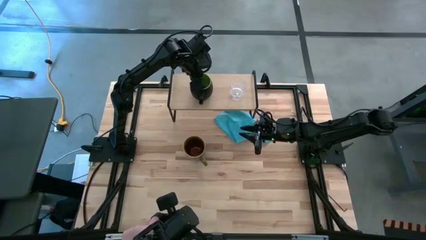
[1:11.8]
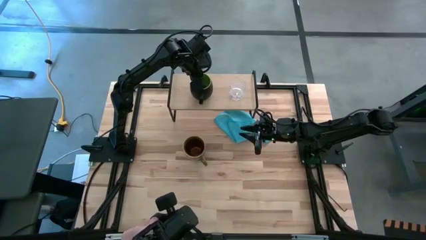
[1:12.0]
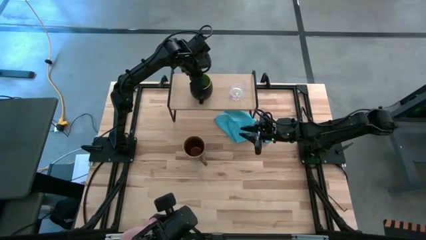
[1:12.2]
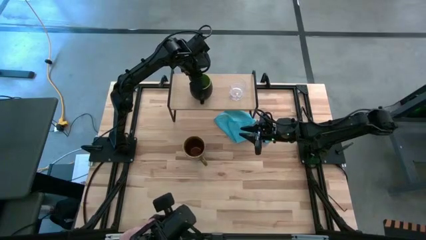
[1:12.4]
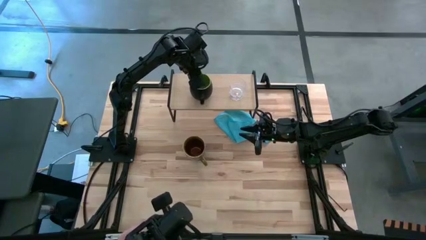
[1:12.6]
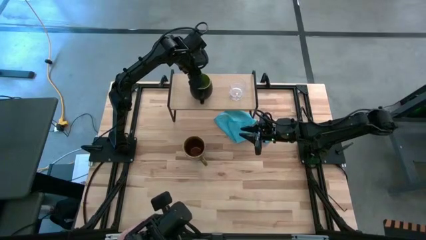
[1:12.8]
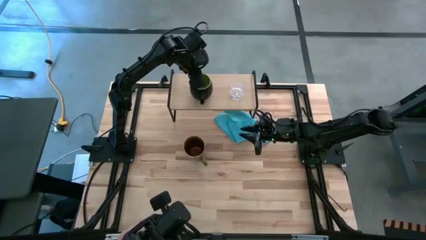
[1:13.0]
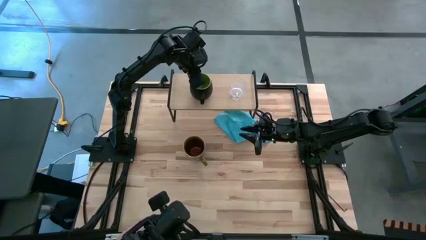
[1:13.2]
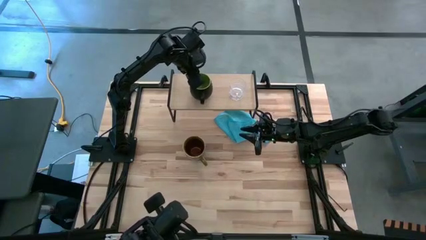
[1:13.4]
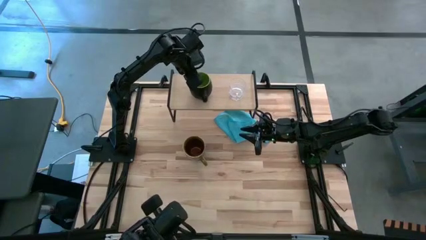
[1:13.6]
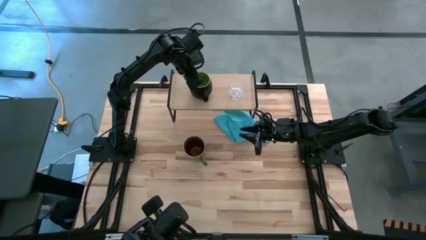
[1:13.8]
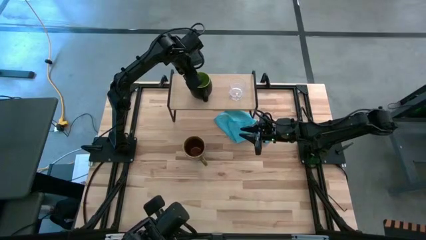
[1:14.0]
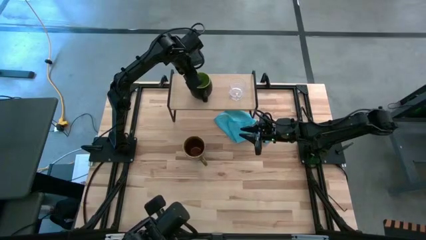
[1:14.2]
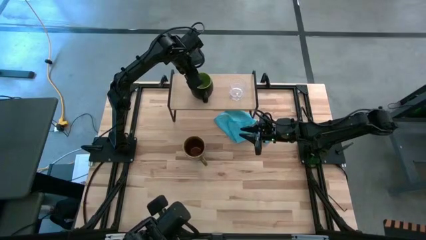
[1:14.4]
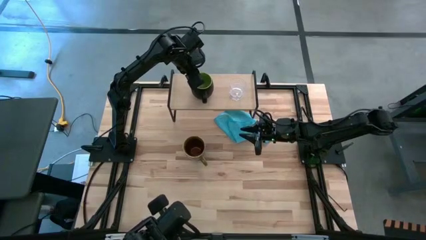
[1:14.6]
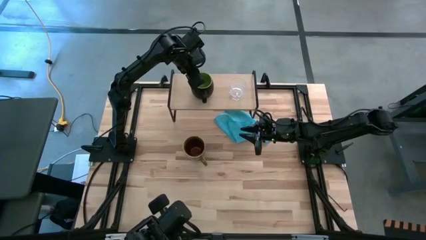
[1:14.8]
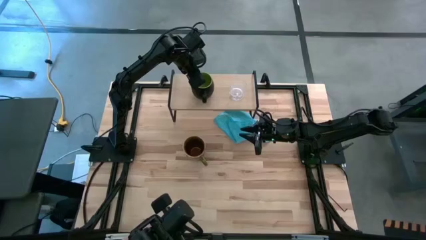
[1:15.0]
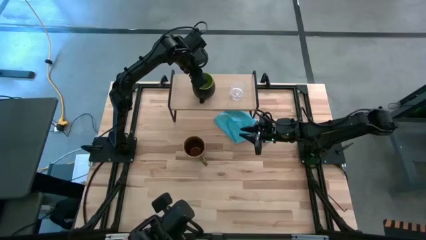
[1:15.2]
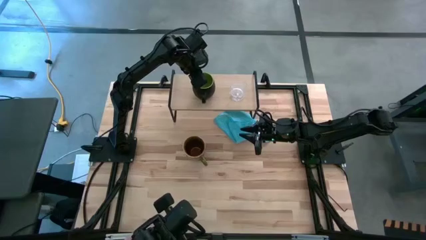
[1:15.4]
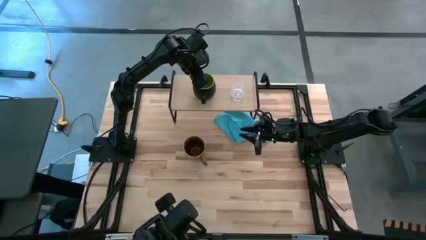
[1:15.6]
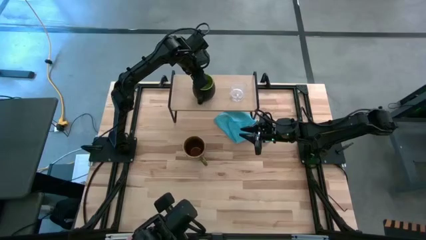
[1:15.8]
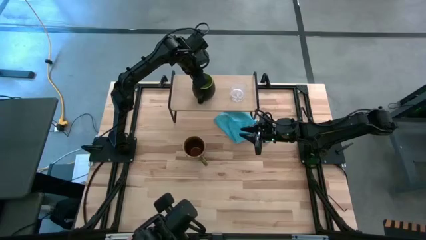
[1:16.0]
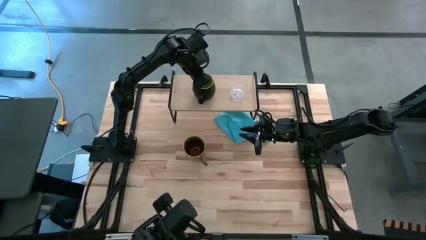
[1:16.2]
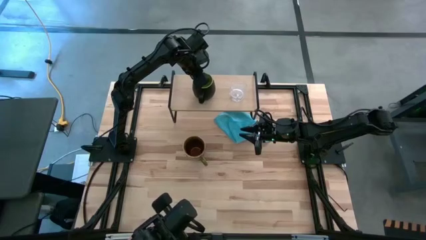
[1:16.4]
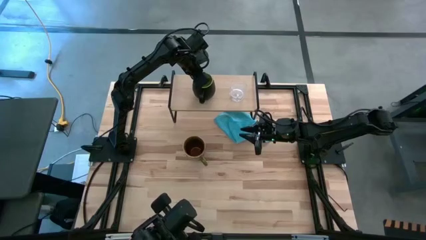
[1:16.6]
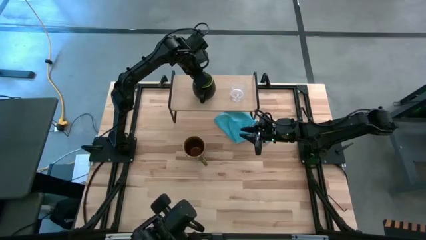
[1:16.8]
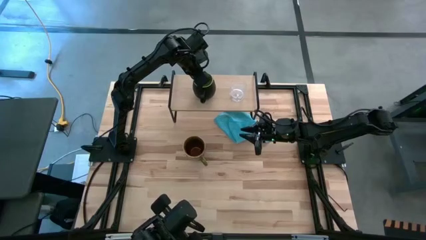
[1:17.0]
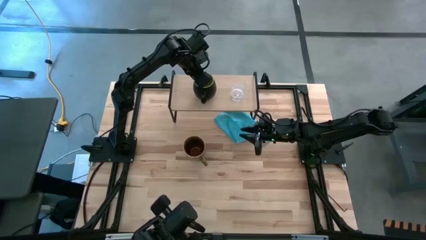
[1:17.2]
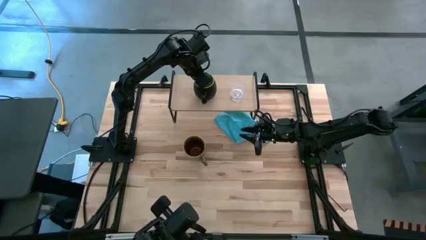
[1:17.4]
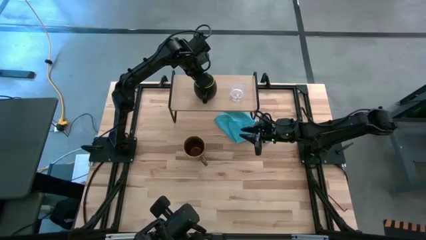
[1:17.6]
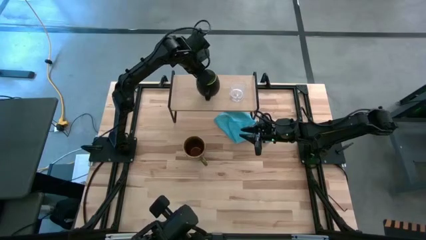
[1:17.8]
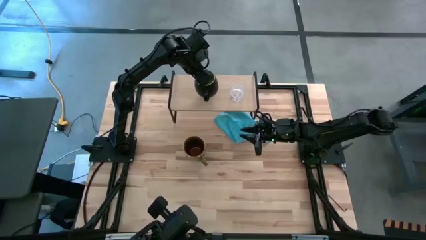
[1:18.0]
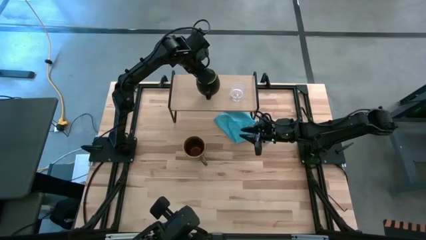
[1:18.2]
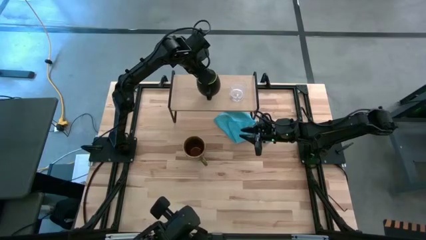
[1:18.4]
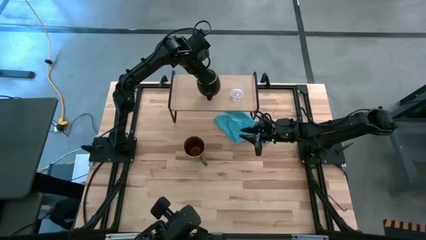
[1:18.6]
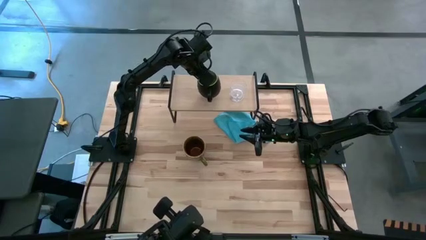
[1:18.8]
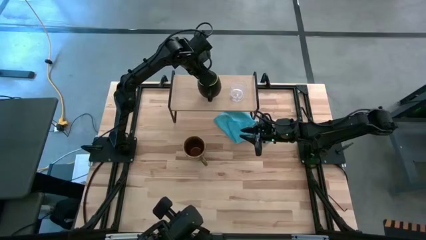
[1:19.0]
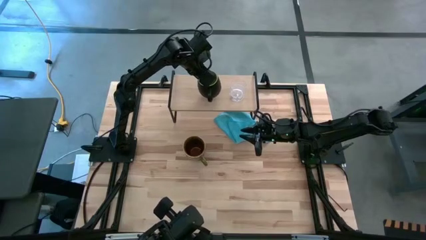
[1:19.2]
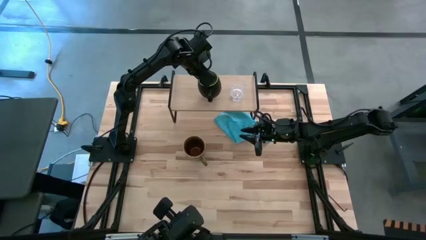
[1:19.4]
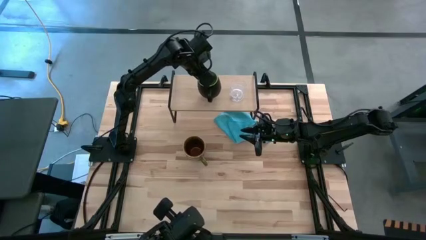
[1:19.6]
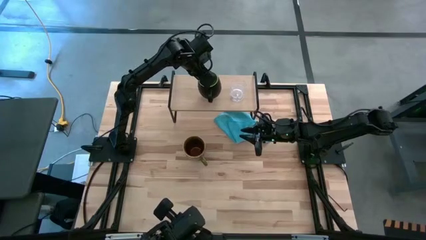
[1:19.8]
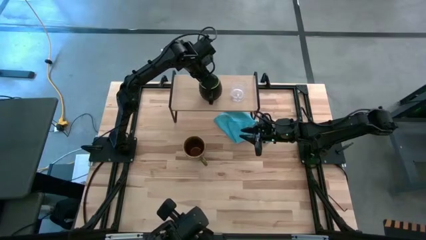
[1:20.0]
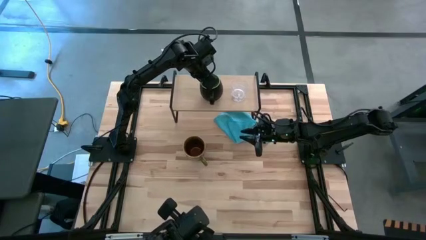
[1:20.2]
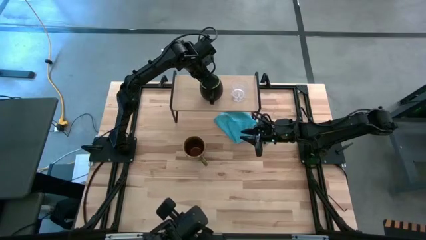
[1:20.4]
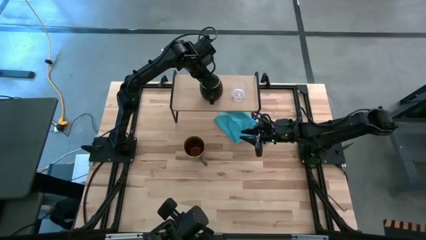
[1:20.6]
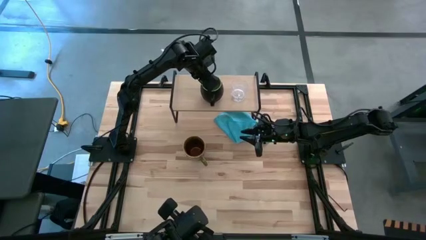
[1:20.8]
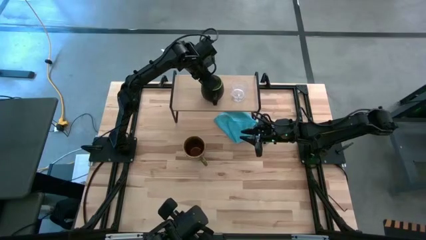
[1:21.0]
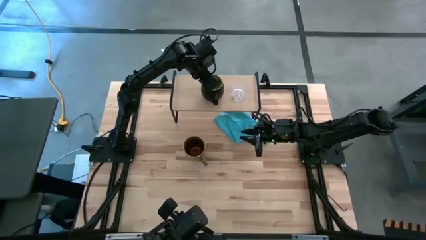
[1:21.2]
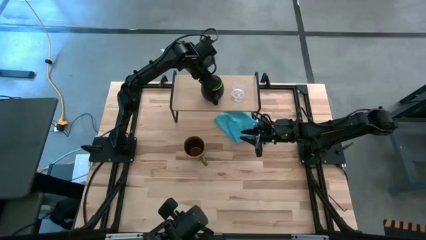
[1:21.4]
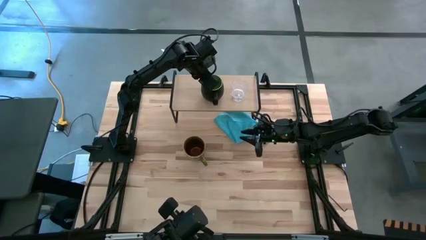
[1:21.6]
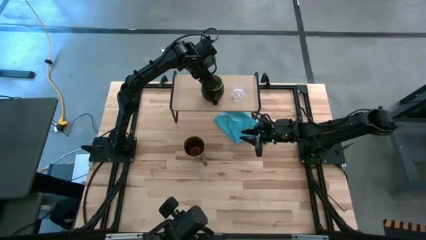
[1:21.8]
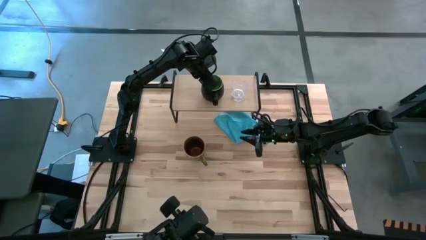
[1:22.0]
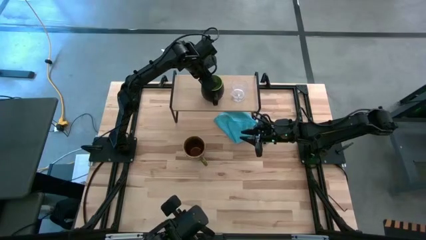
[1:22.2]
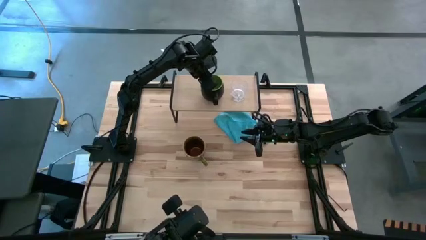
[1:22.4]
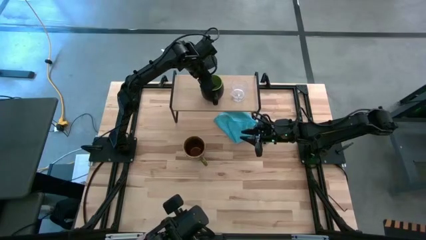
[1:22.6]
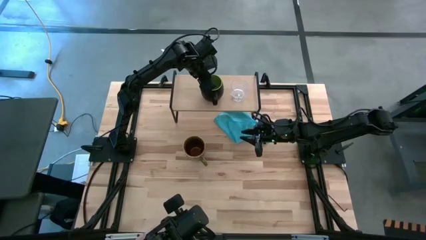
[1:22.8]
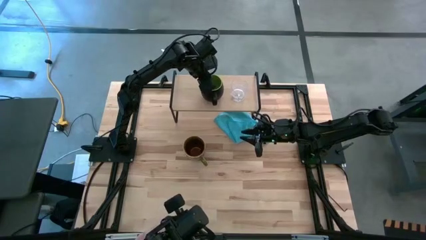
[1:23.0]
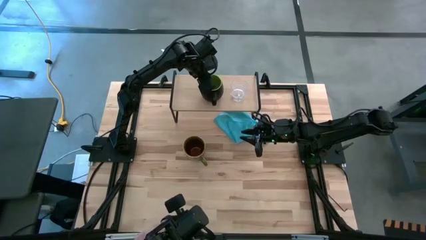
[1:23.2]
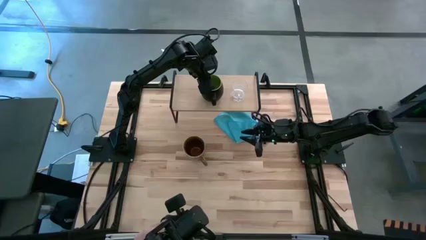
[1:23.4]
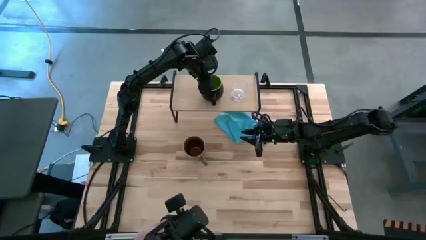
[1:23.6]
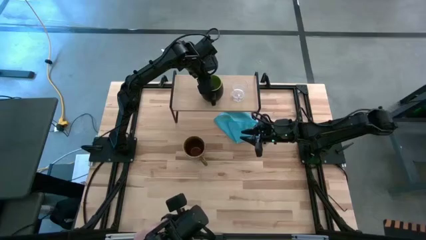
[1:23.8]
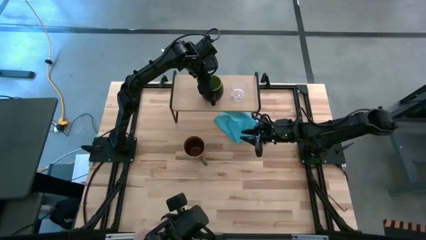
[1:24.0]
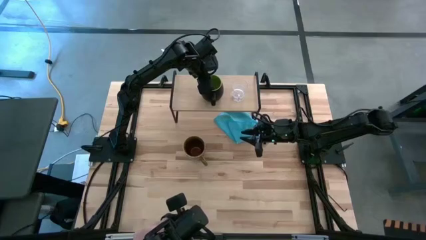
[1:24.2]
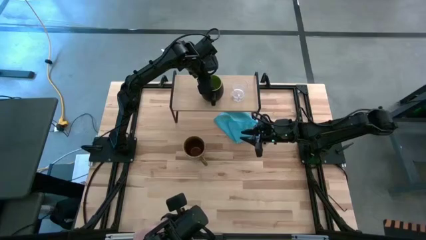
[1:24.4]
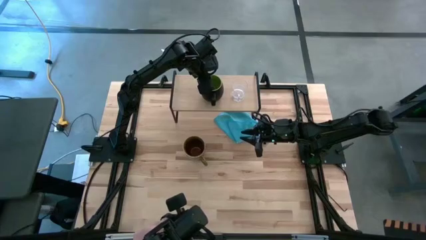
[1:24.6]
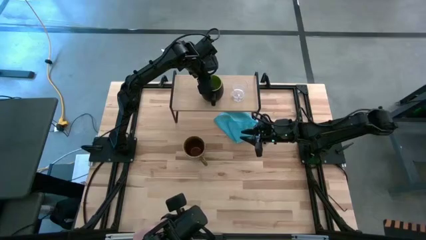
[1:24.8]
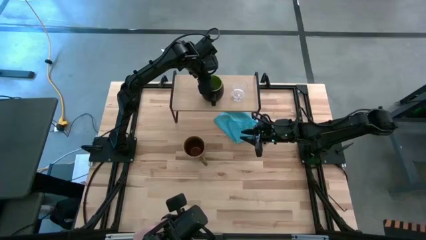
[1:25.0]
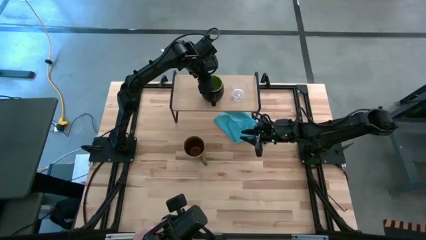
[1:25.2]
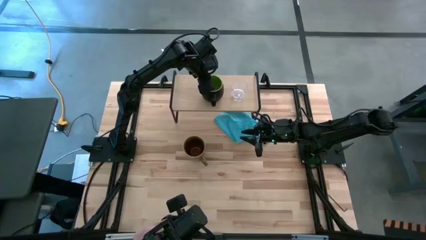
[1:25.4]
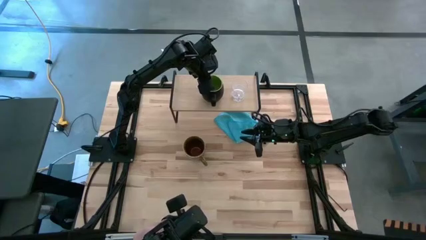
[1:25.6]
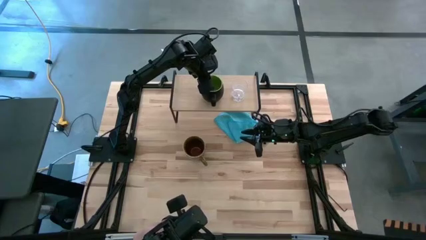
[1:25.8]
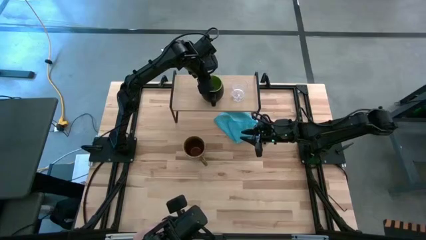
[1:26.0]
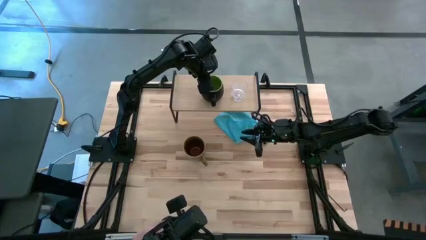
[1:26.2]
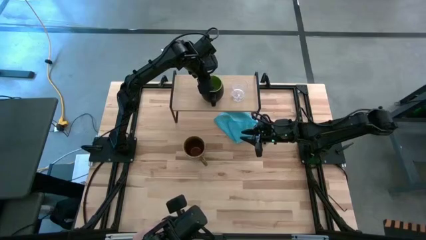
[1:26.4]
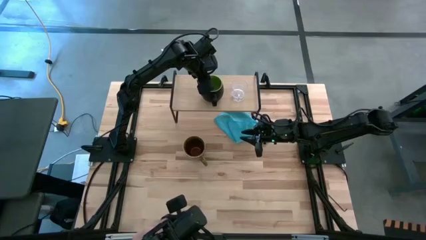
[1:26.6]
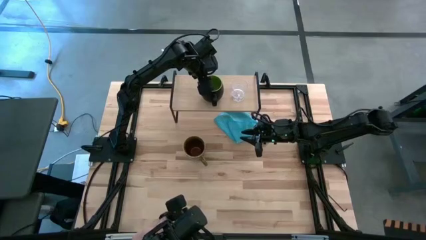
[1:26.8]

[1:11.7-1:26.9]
Task: Stack small to large cups/mugs on shelf
Put the black mug on the shelf

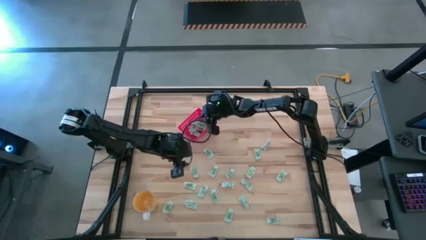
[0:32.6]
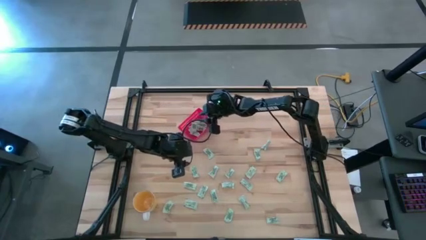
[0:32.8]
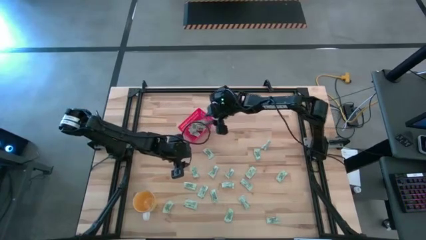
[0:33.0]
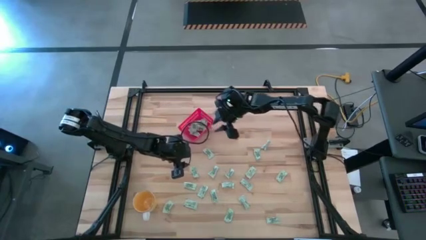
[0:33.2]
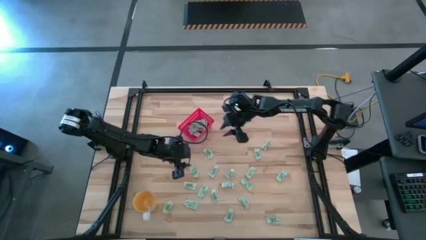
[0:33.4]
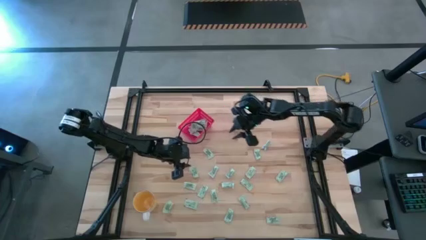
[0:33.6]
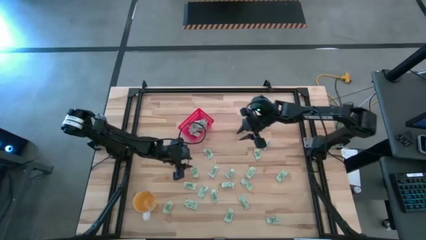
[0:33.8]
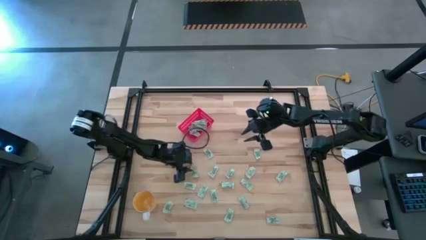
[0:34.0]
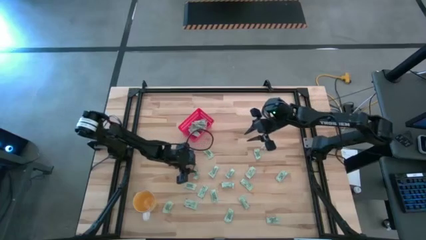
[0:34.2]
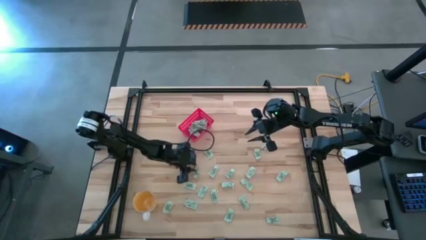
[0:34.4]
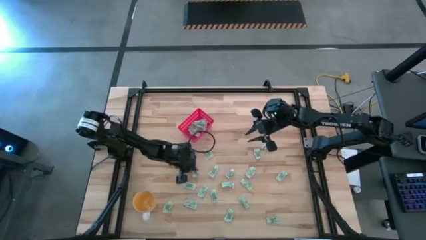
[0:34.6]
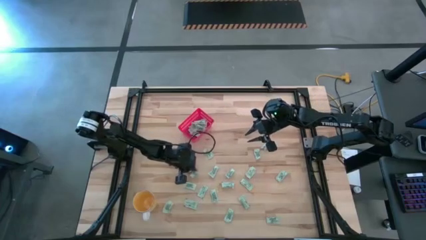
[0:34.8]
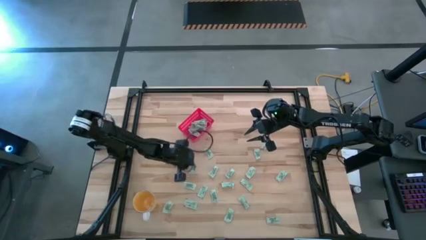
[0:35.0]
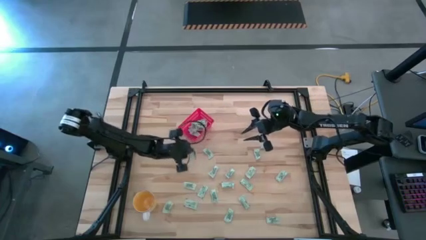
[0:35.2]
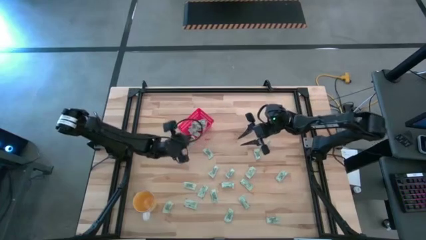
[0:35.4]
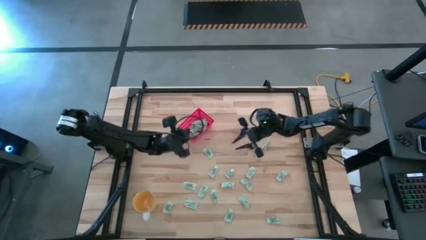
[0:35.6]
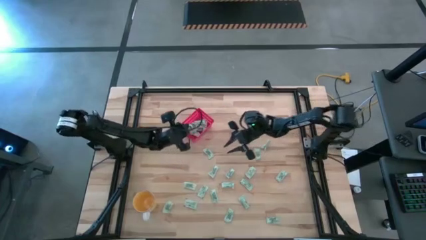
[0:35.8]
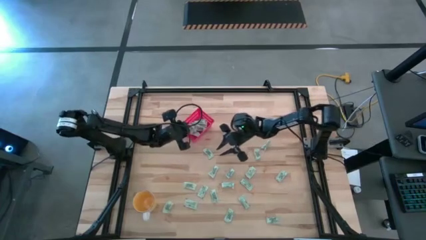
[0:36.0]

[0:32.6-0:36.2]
Task: Pick and place Stevia / Truvia into bins
Put the white stevia packet into the red bin
